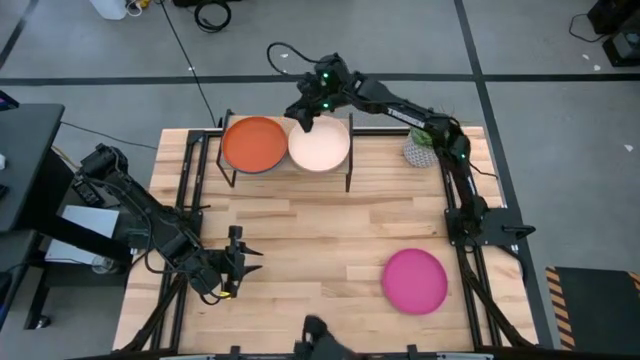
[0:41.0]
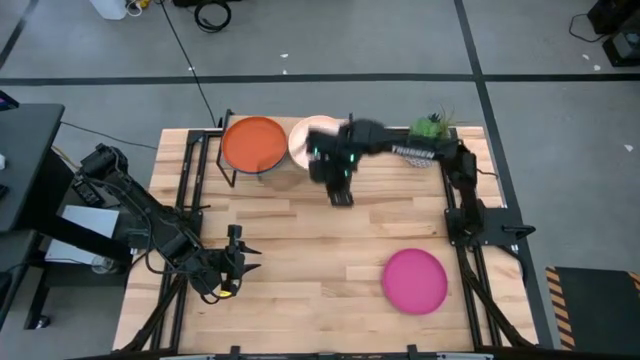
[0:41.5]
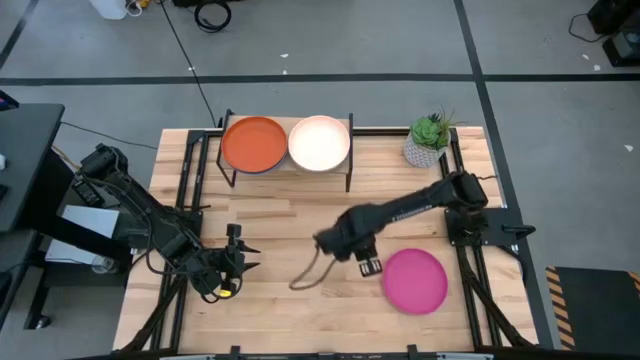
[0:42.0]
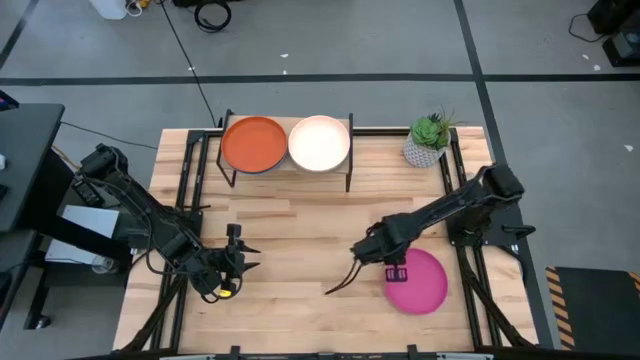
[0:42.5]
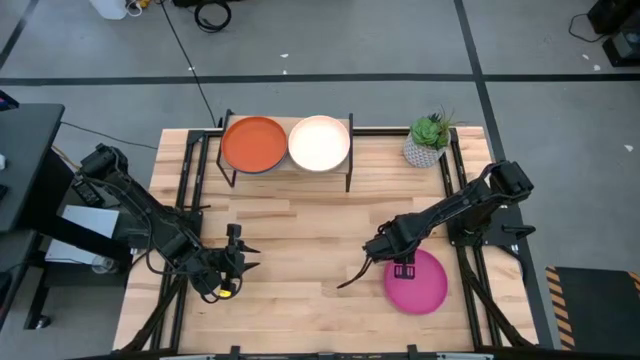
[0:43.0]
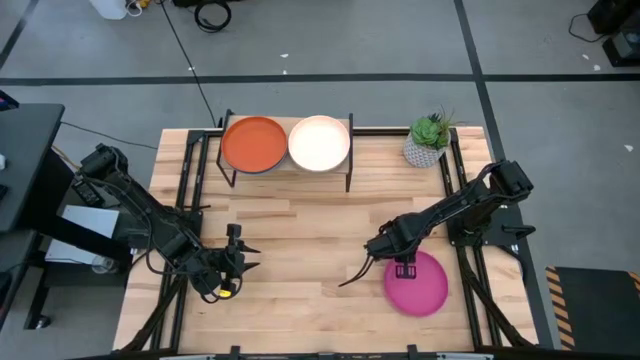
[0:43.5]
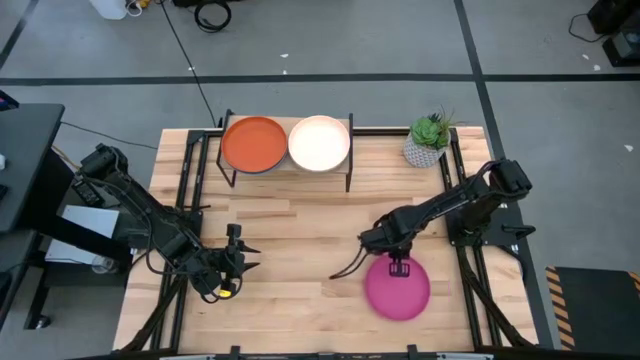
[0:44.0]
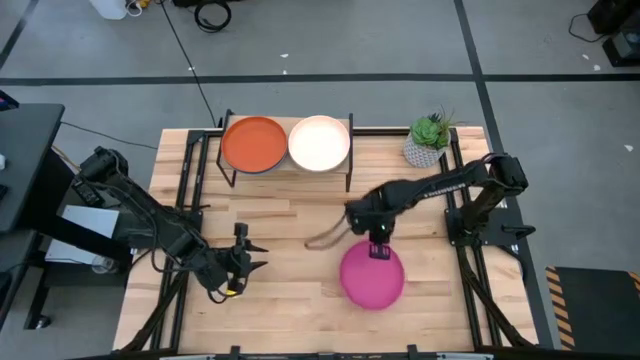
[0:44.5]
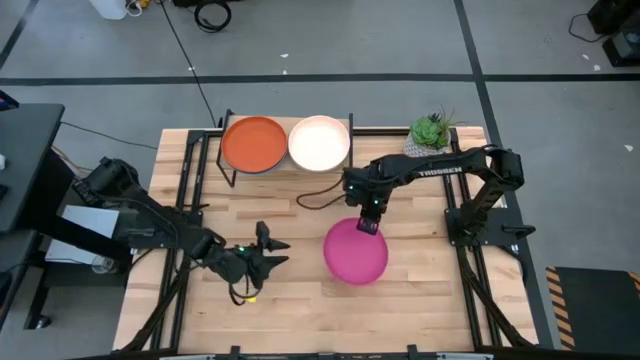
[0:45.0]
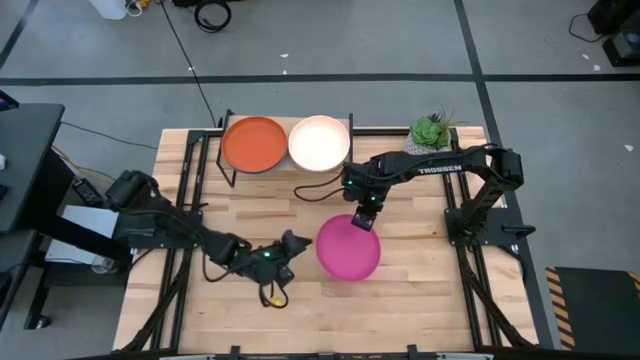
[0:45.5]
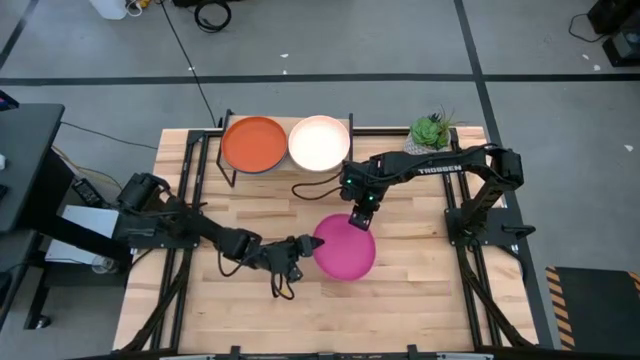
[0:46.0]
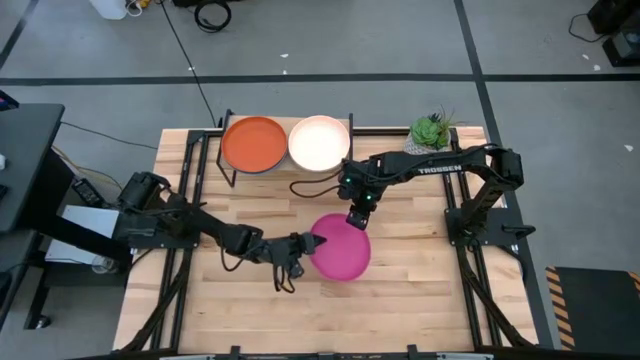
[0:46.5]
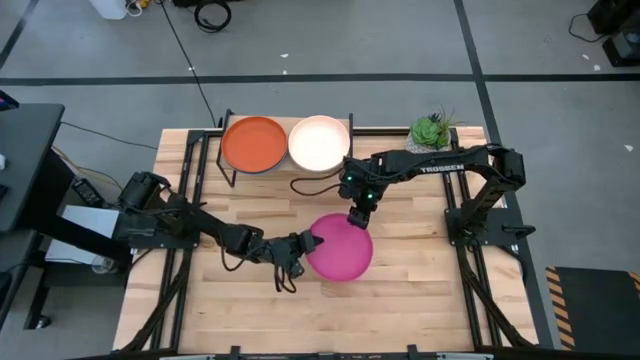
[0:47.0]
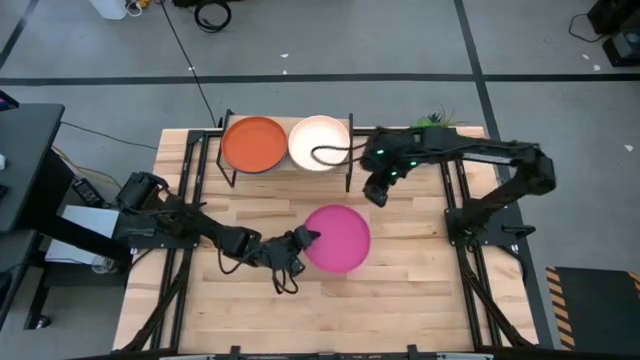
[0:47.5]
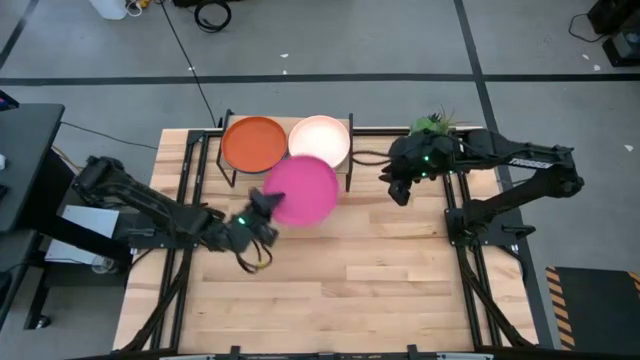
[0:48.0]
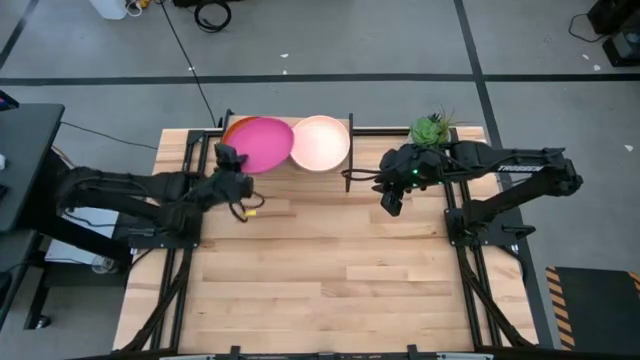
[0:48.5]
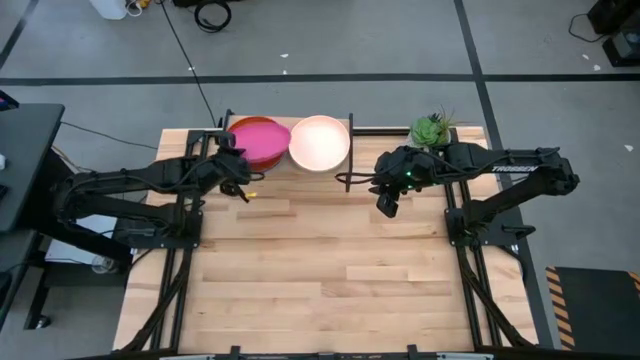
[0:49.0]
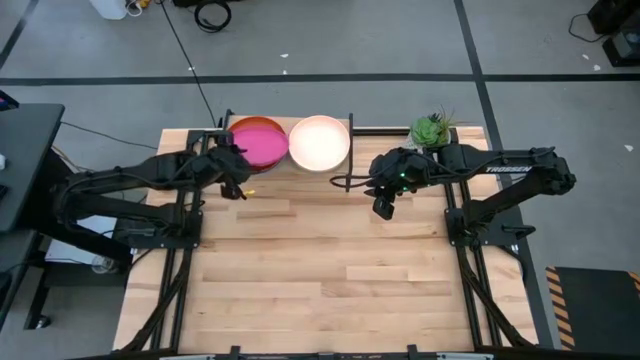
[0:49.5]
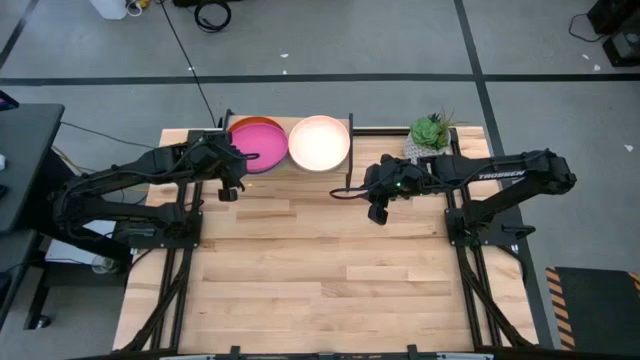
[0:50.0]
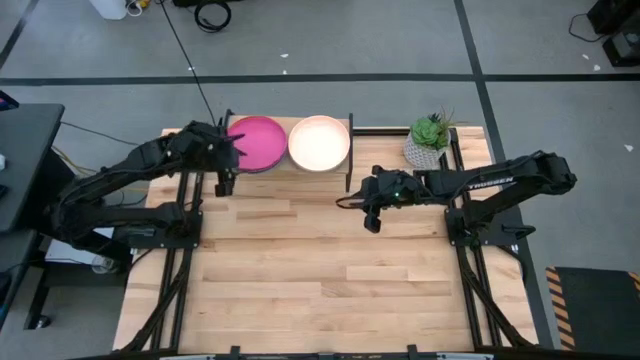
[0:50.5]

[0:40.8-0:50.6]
Task: Place and stack plates onto a shelf
Stack the pink plate on top of the orange plate on the shelf

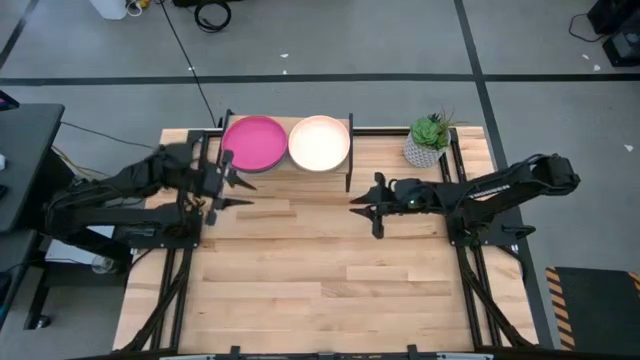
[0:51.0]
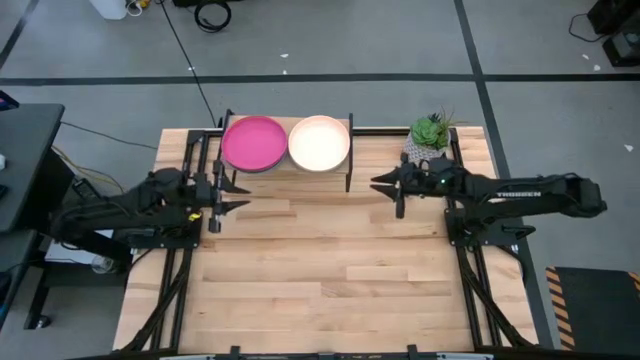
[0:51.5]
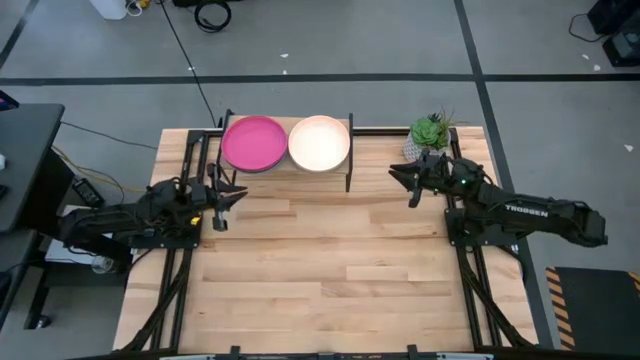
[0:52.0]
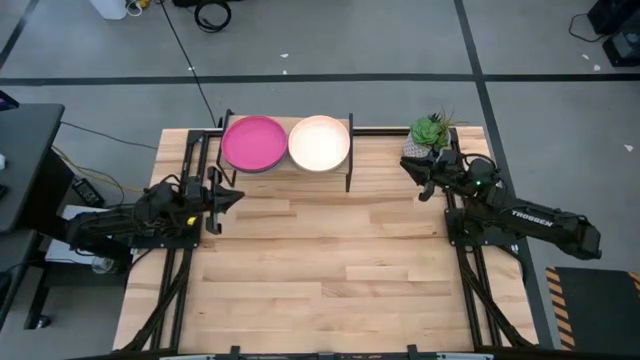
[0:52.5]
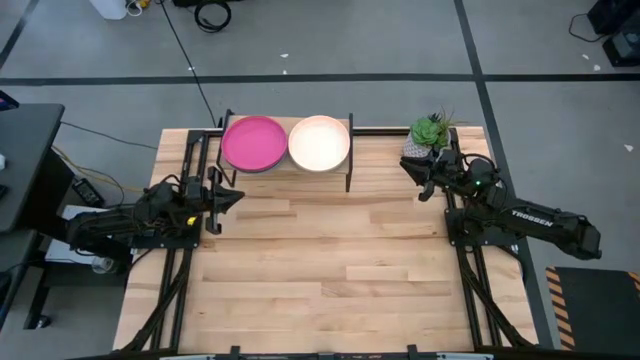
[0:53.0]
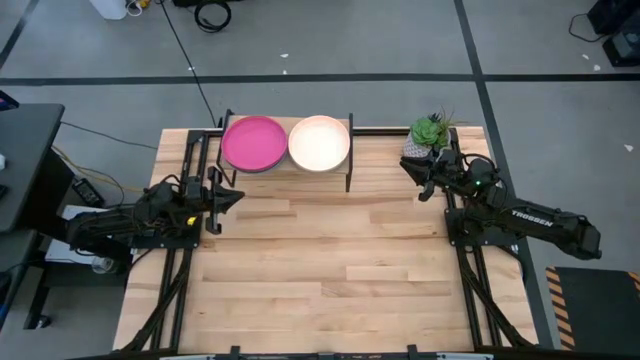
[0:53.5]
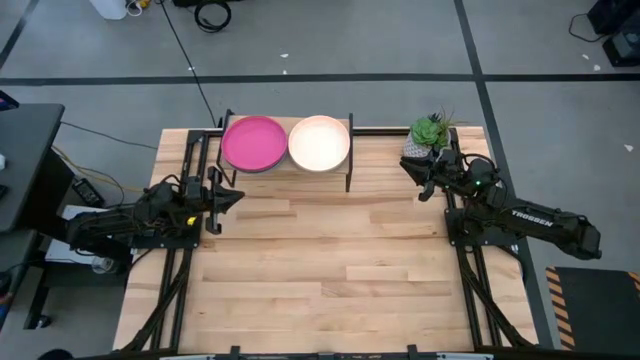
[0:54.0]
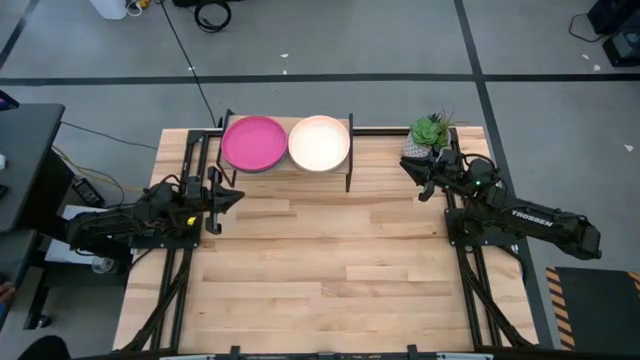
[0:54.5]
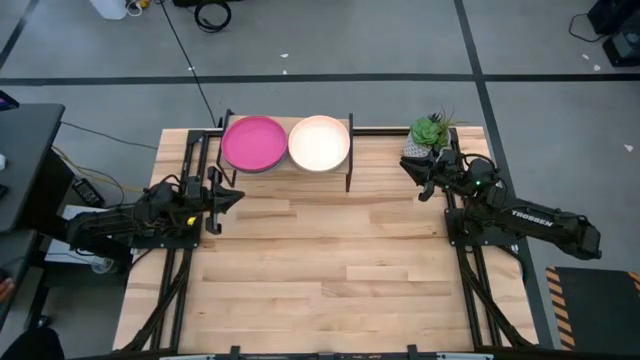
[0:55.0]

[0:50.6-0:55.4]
Return to Home Position

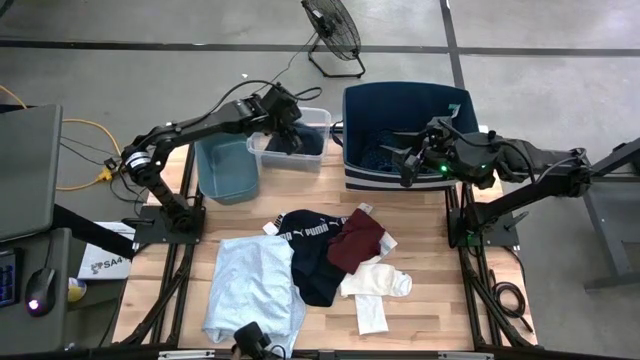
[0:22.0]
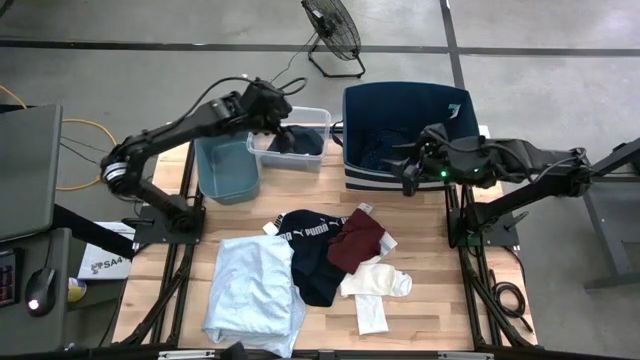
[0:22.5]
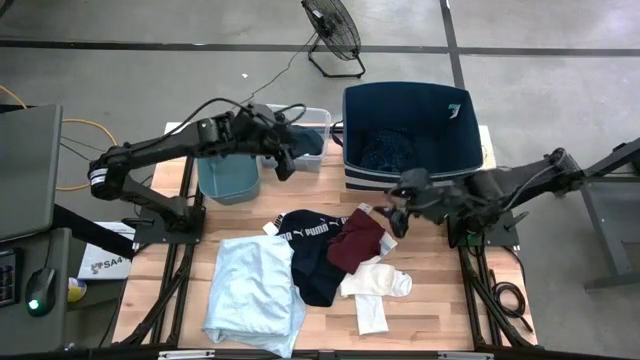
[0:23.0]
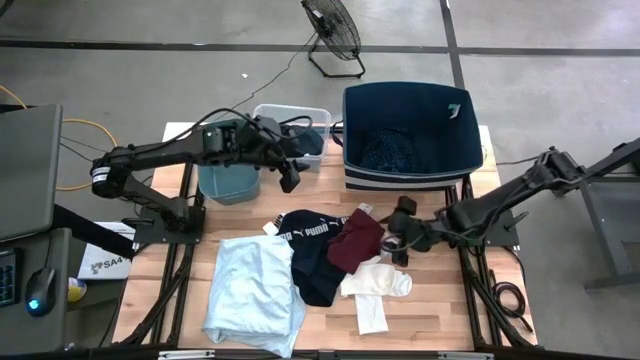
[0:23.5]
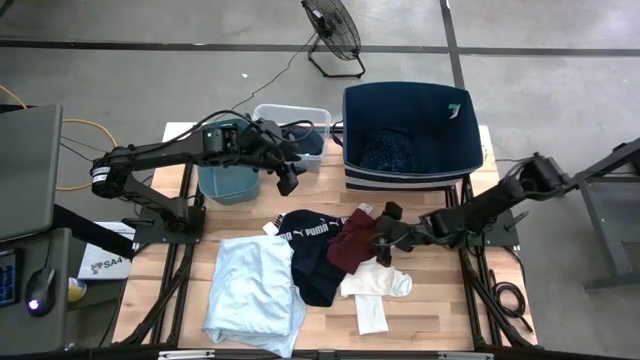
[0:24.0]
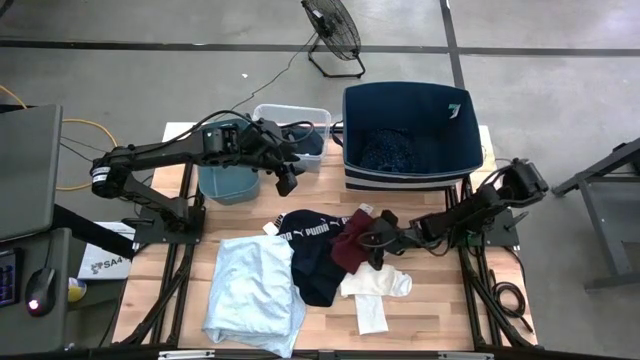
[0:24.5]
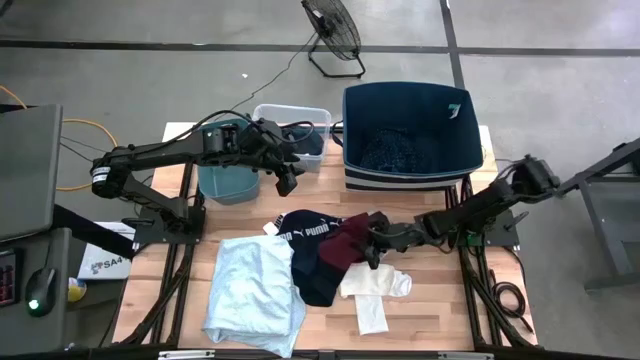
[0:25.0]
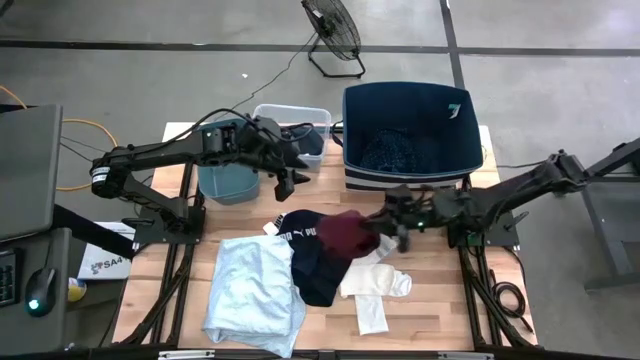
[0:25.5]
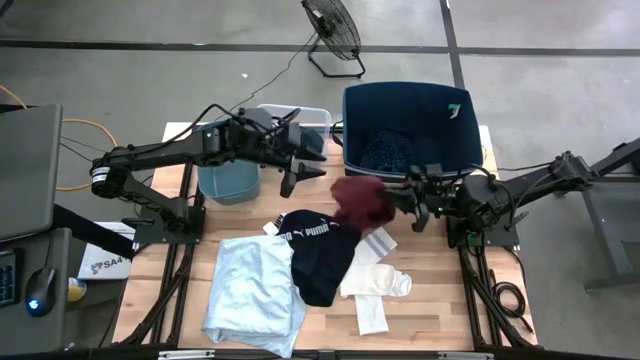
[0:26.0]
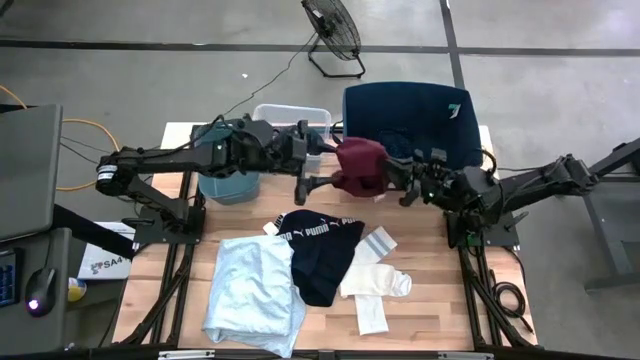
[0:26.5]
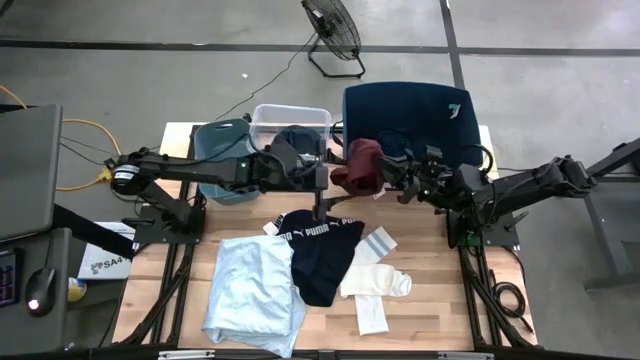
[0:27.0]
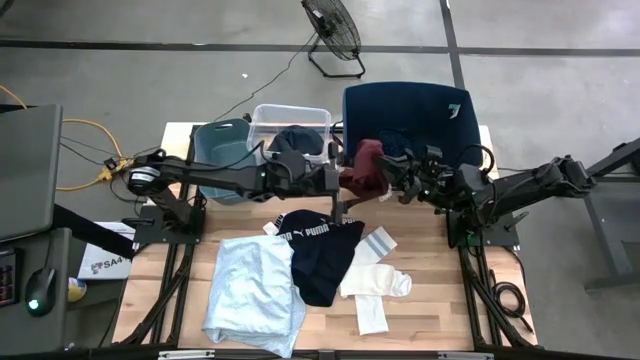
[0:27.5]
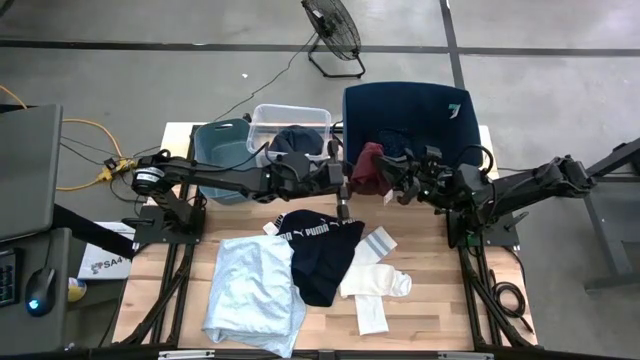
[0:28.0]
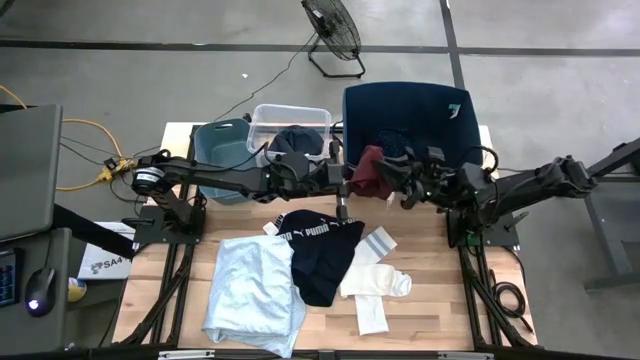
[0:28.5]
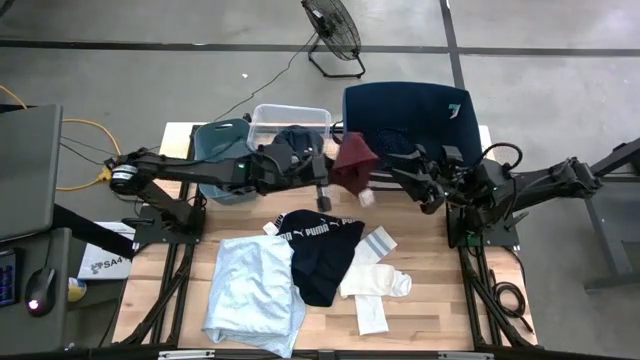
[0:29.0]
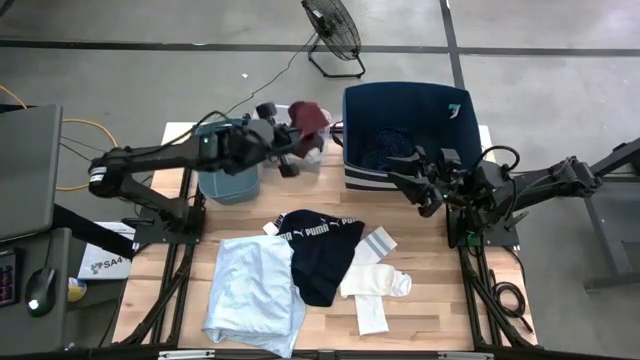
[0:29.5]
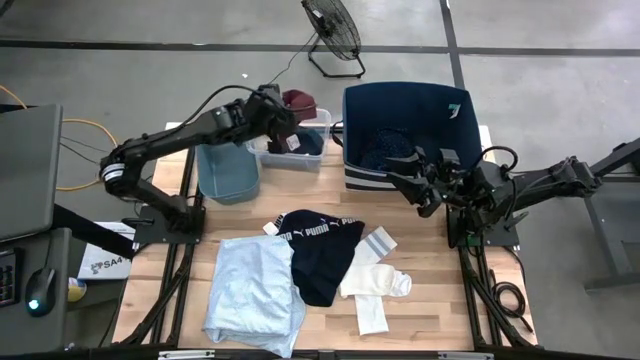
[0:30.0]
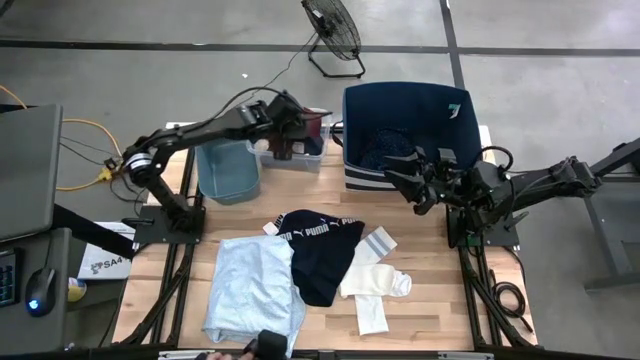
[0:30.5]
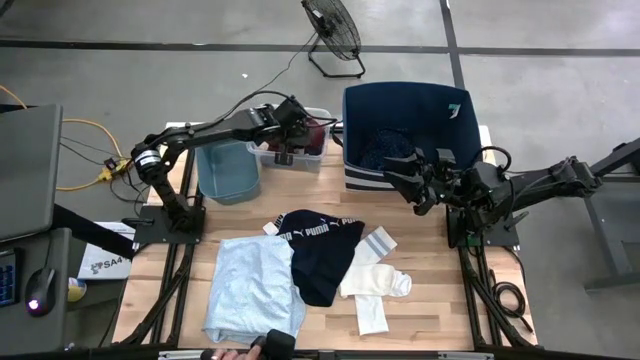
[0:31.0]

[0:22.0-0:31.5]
Task: Pick & Place Cloths
Put the red boxer shorts into the transparent bin
